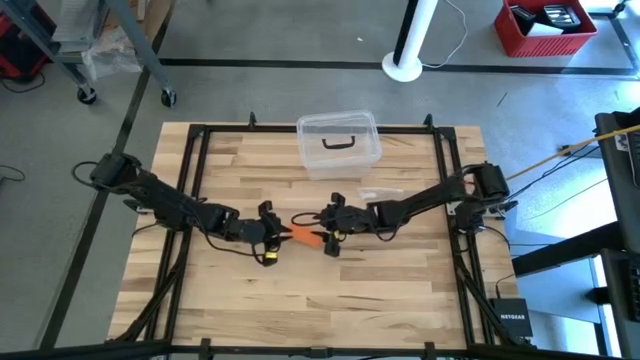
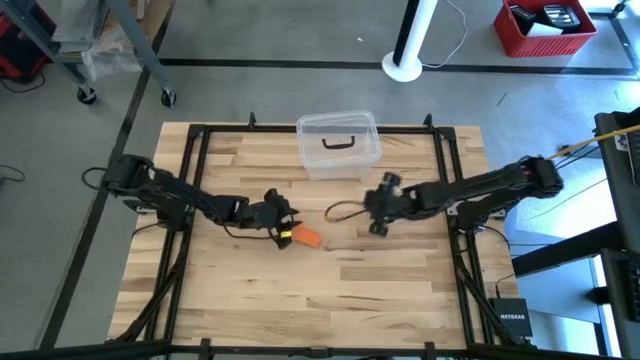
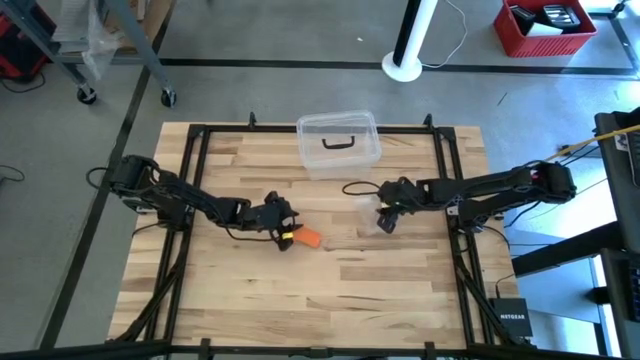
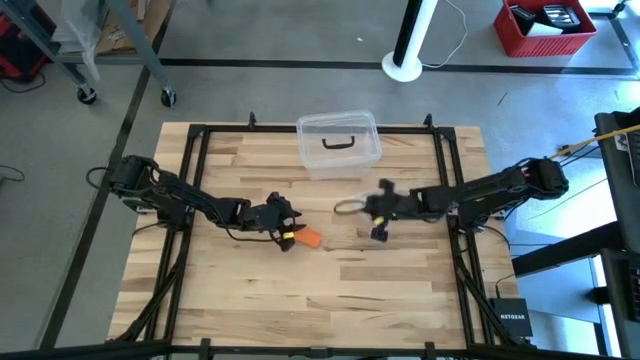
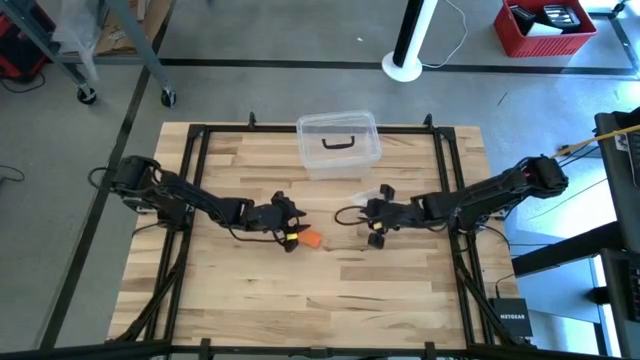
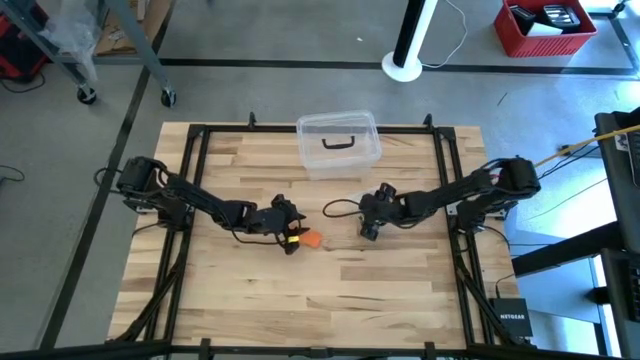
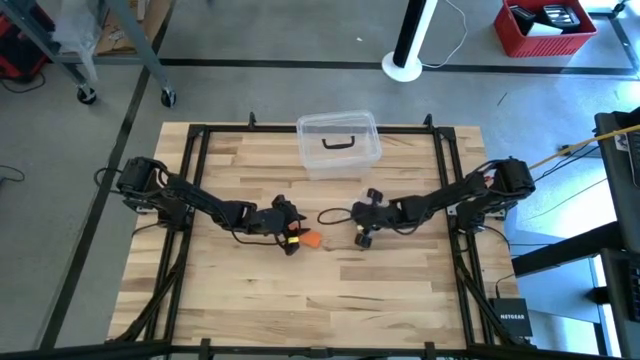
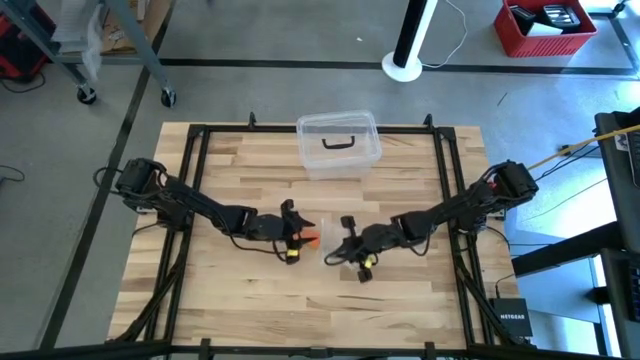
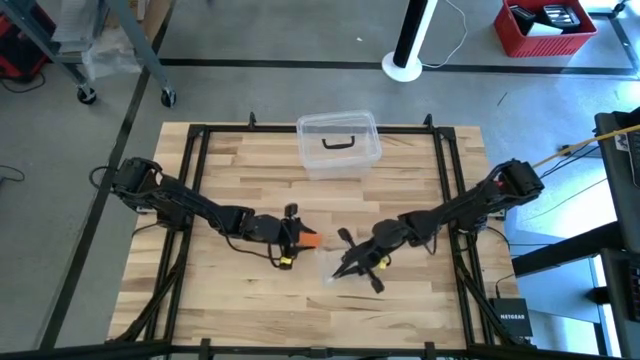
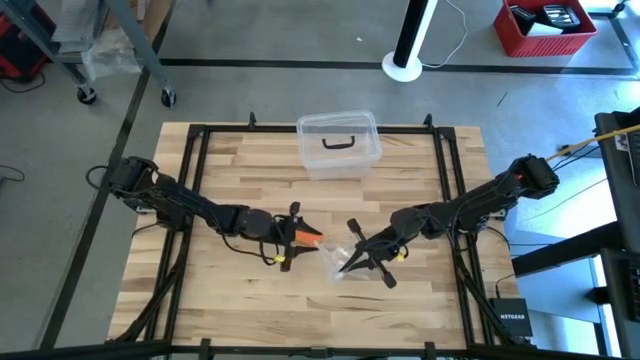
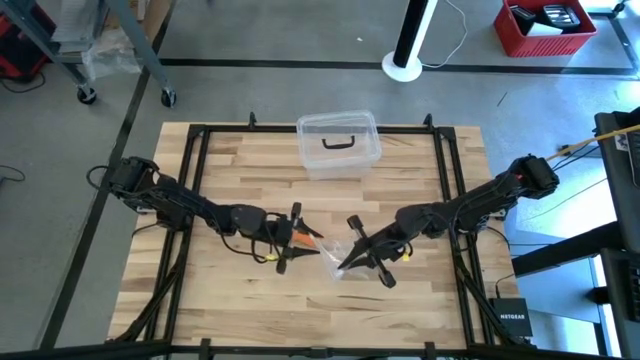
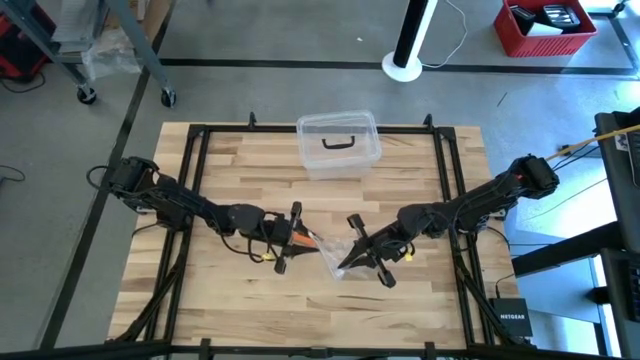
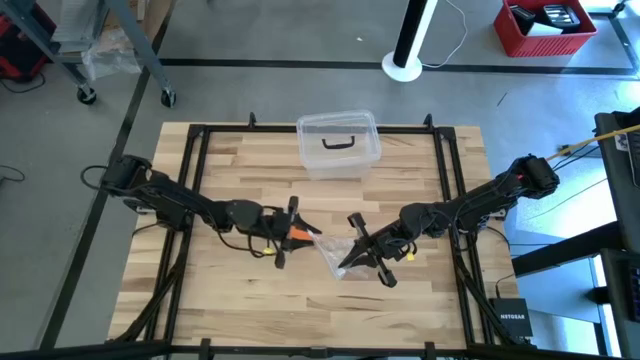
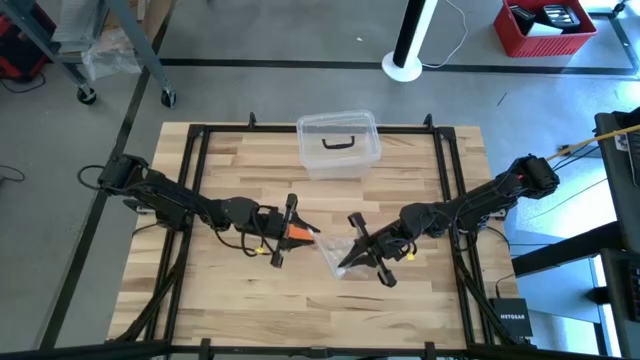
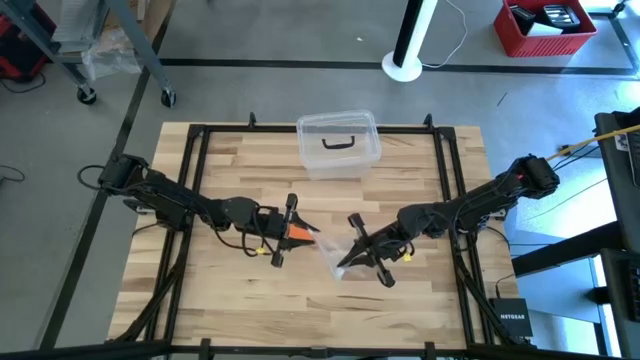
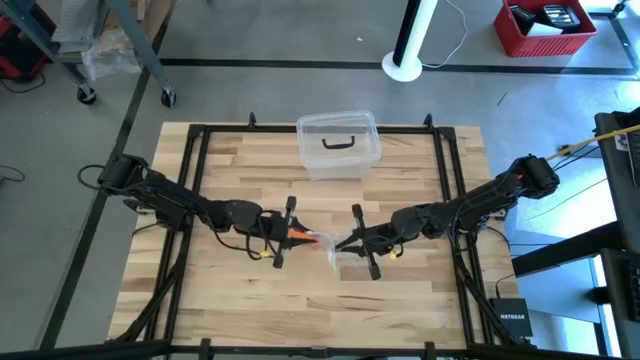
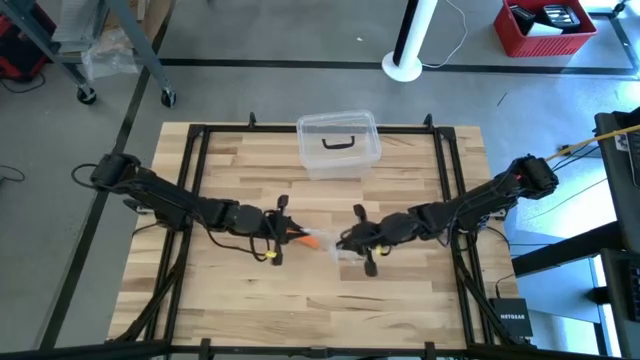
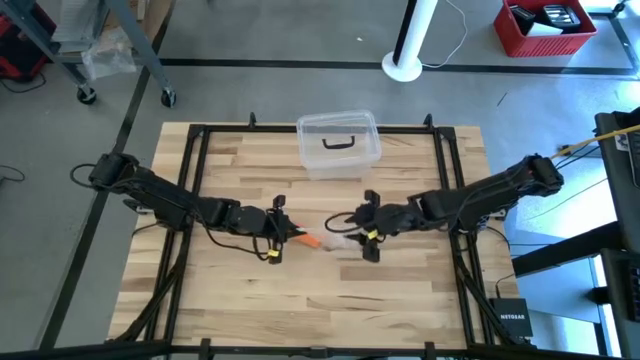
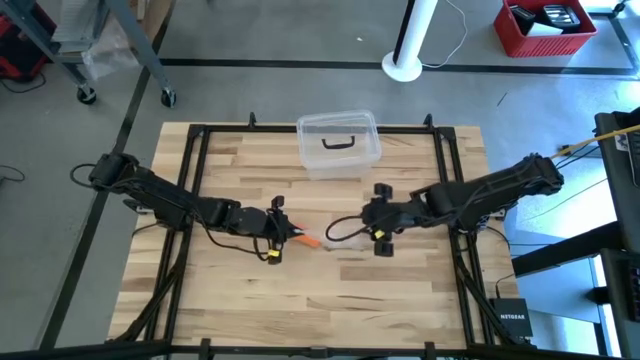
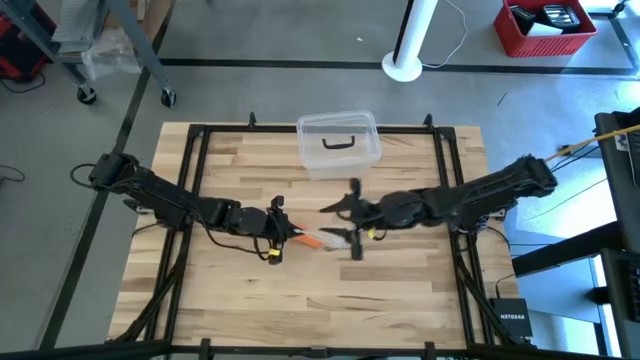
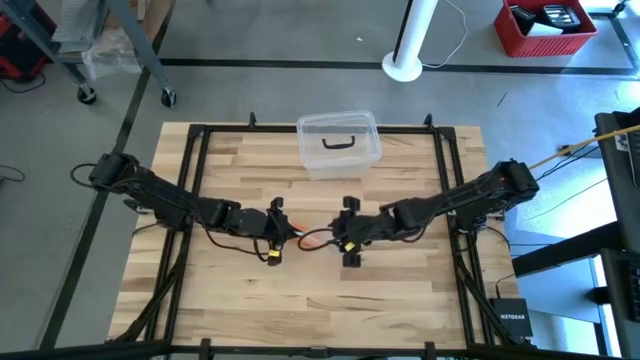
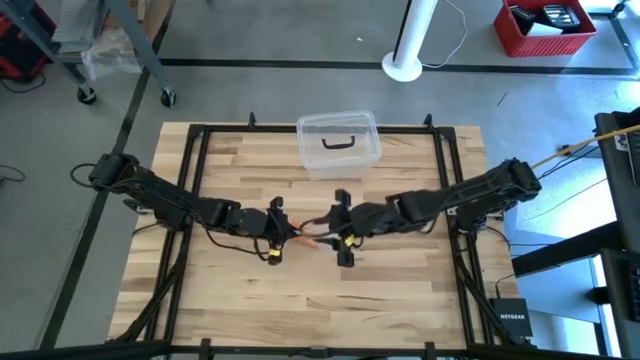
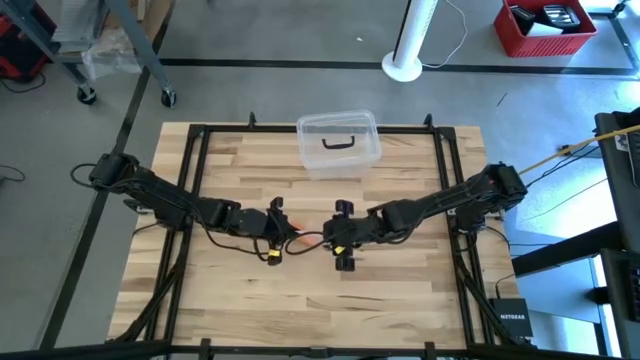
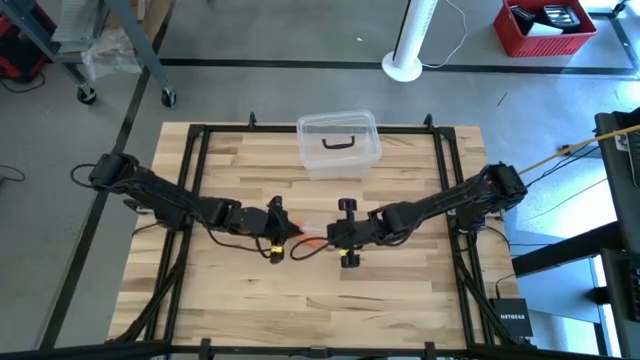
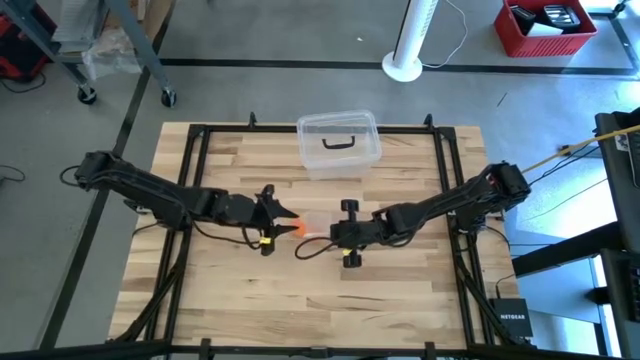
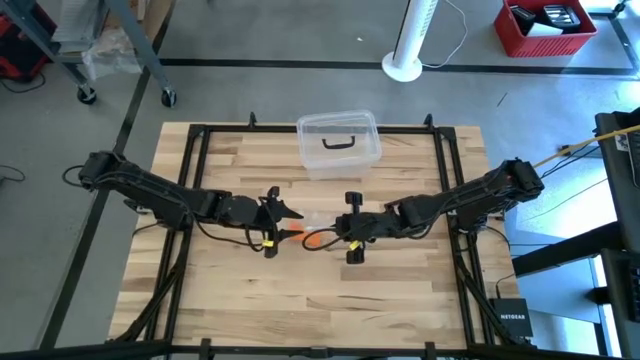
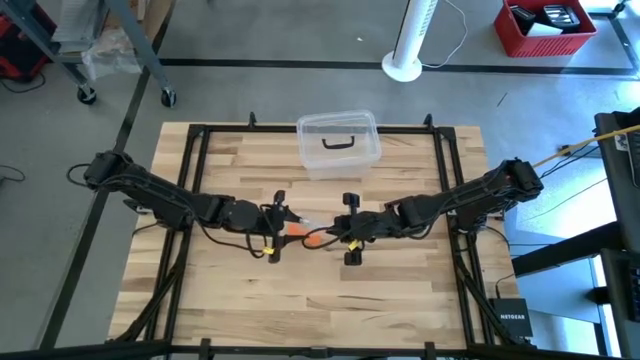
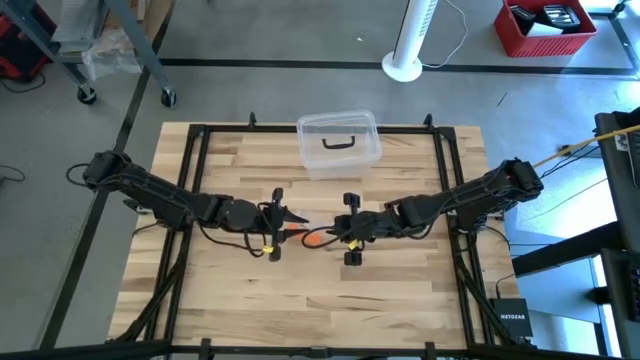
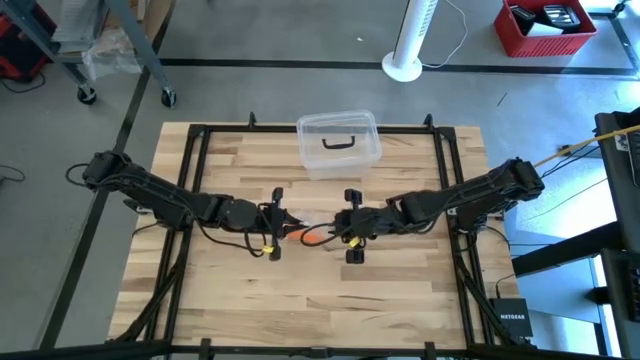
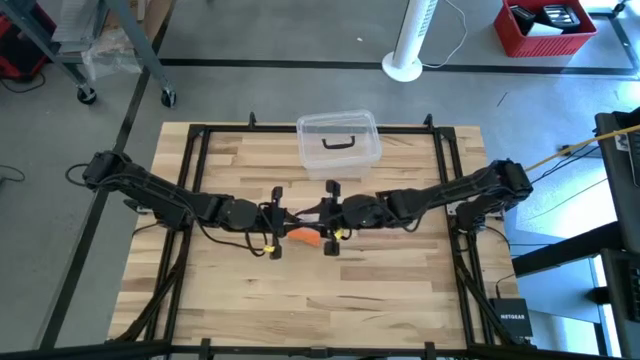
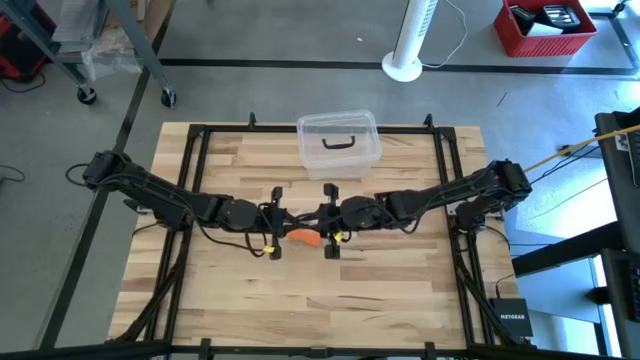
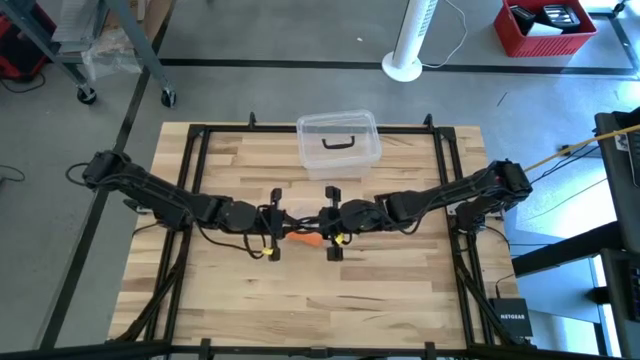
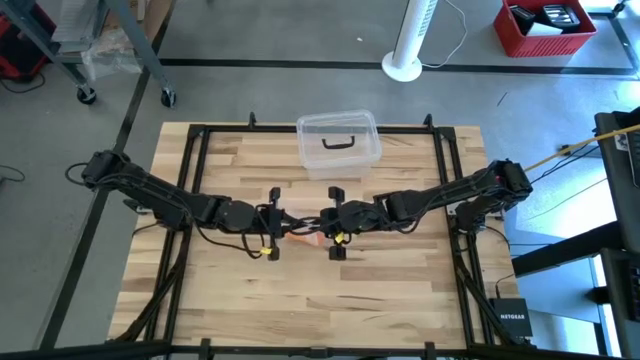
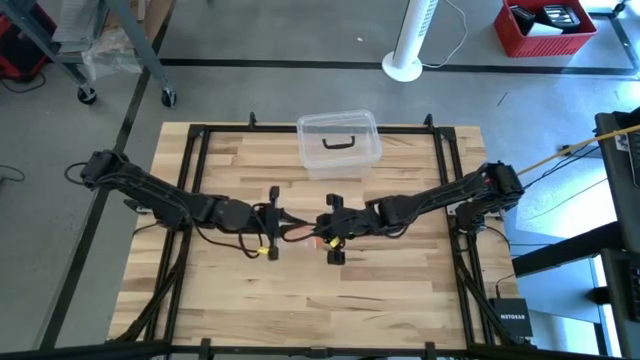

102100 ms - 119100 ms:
Task: Roll bandage
Open the transparent zip bag
